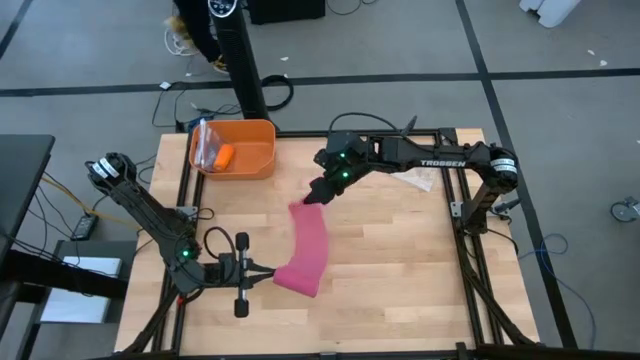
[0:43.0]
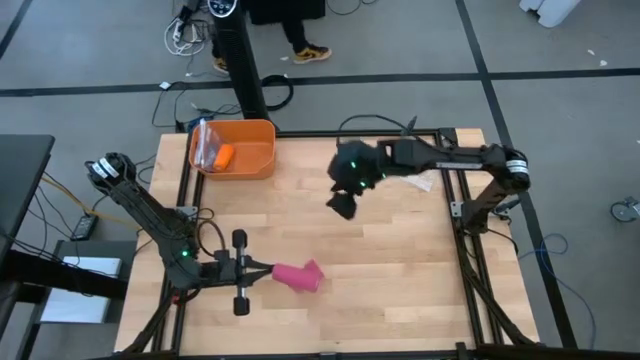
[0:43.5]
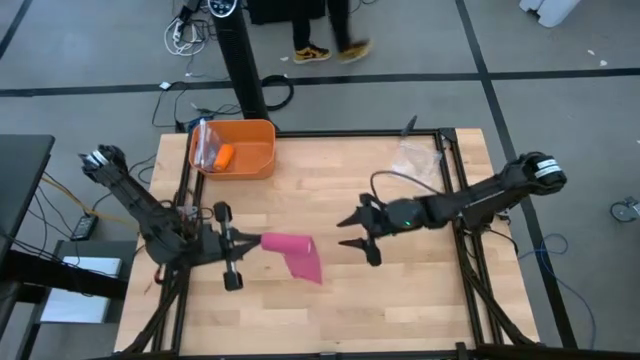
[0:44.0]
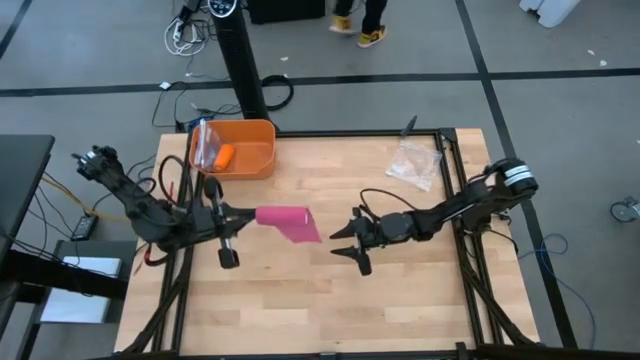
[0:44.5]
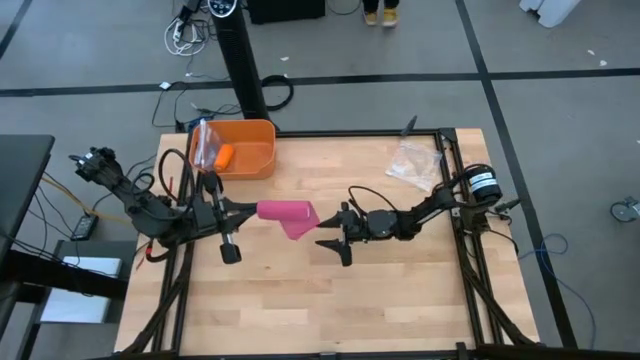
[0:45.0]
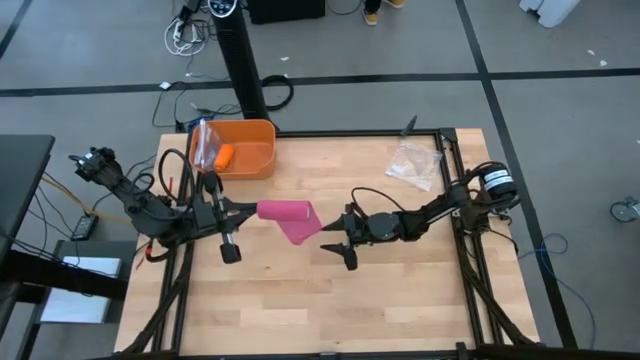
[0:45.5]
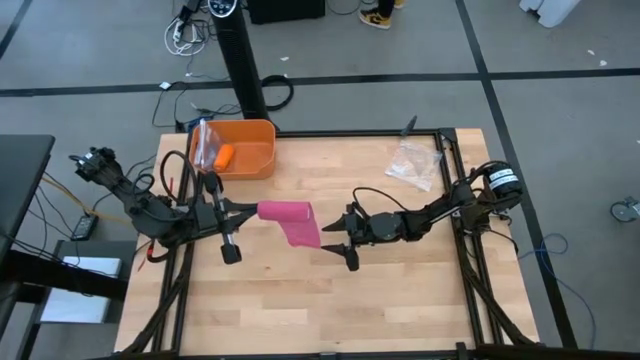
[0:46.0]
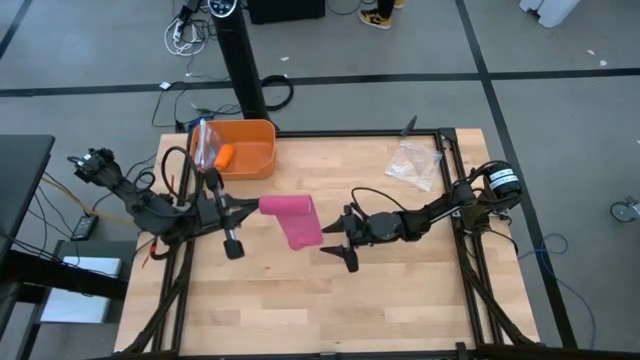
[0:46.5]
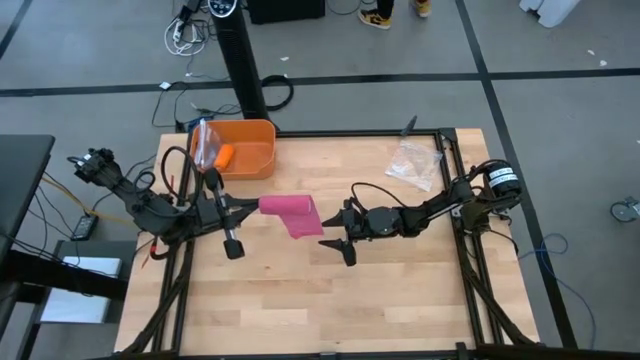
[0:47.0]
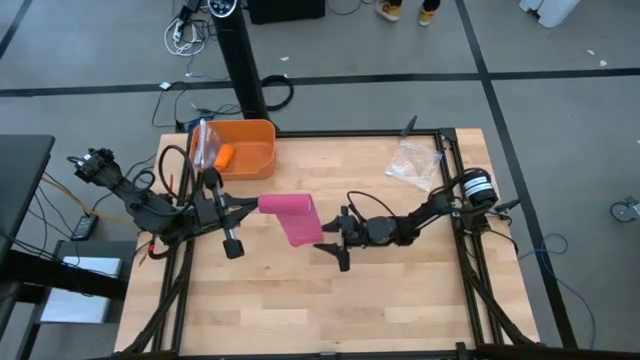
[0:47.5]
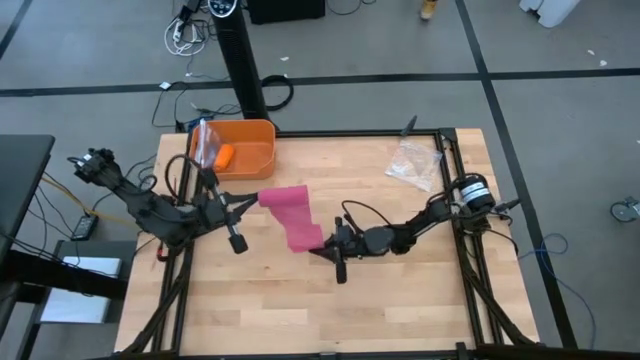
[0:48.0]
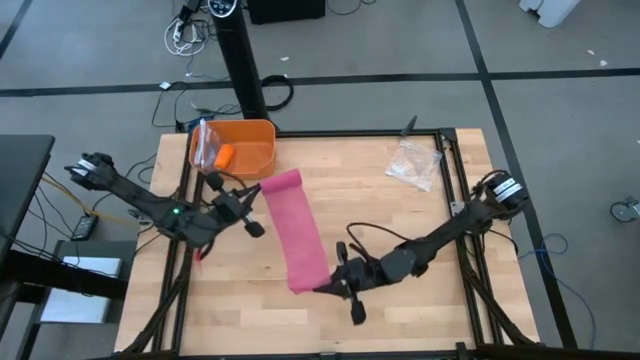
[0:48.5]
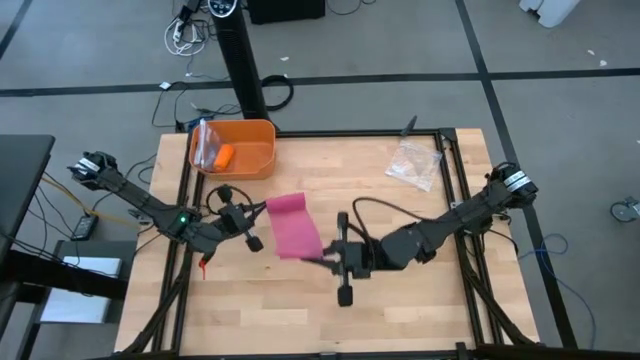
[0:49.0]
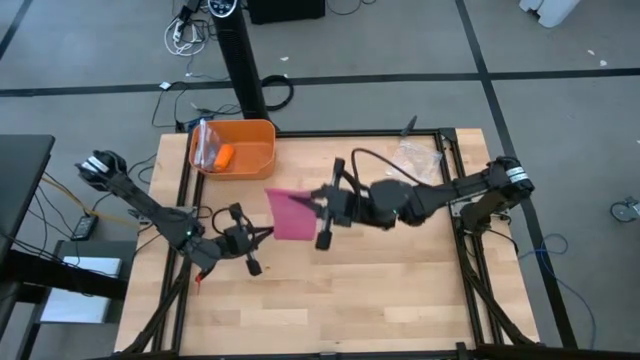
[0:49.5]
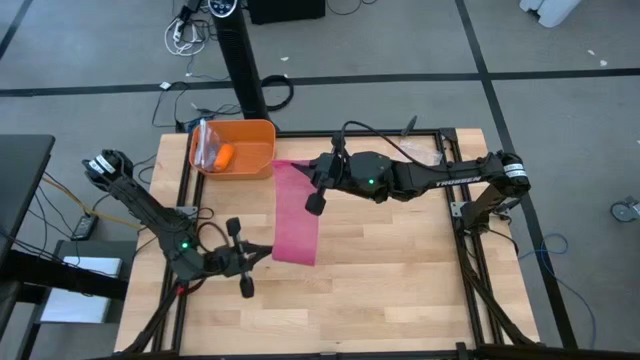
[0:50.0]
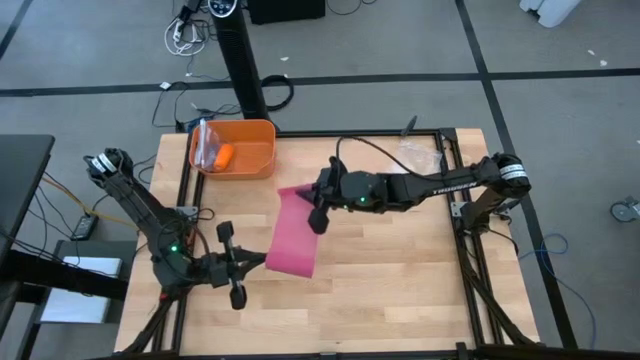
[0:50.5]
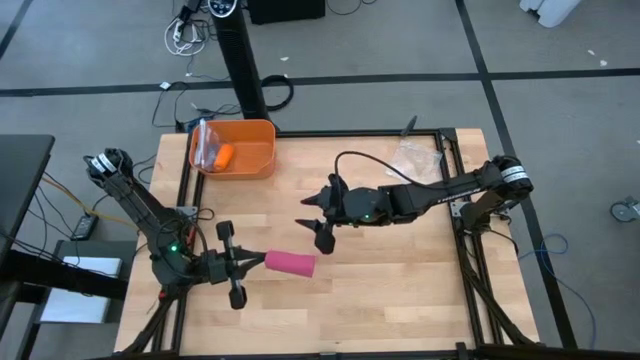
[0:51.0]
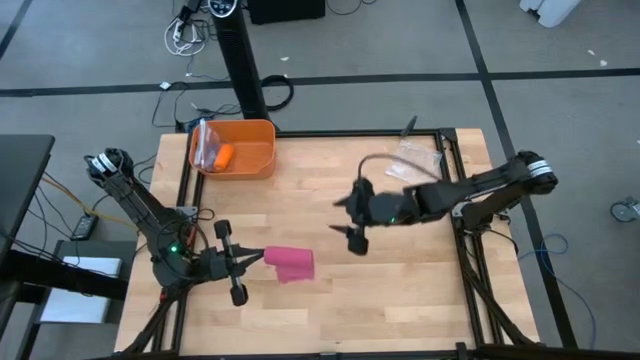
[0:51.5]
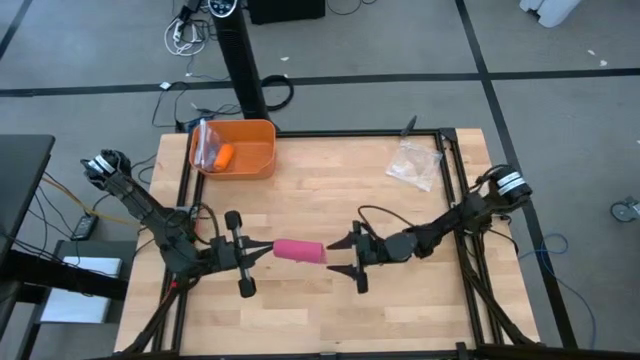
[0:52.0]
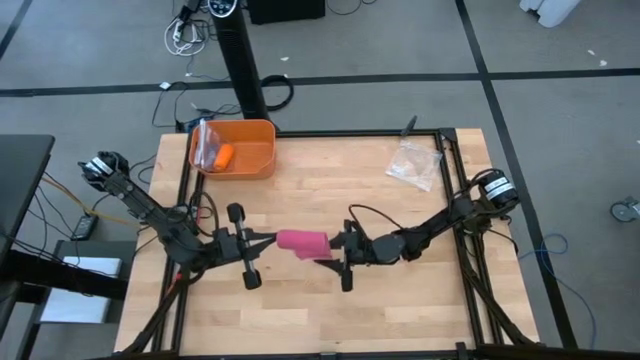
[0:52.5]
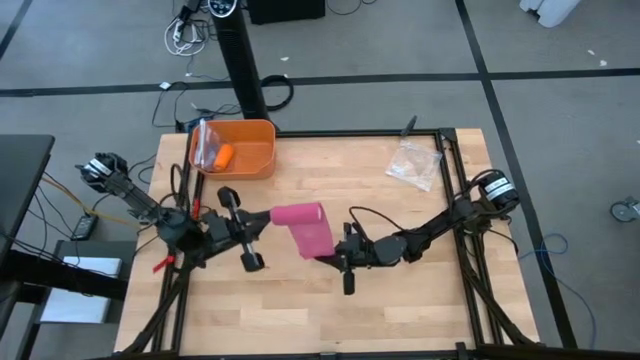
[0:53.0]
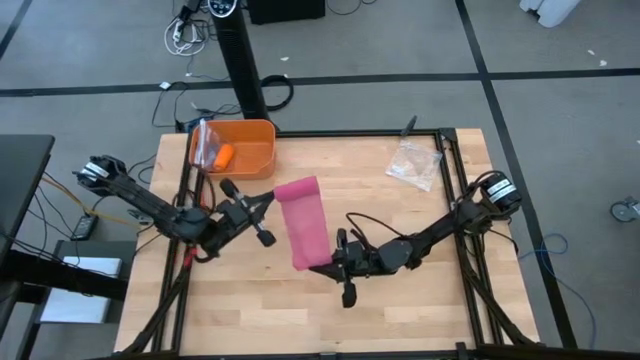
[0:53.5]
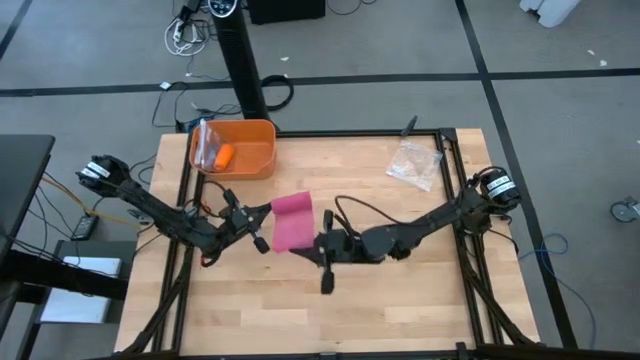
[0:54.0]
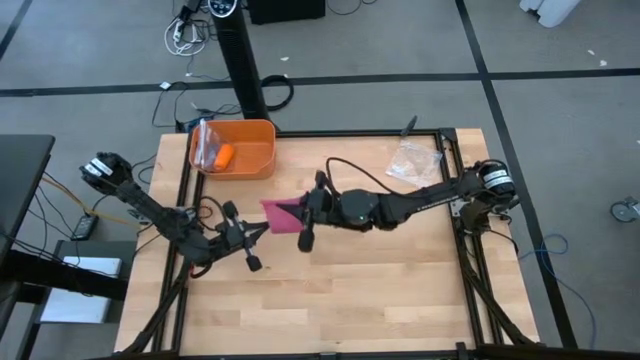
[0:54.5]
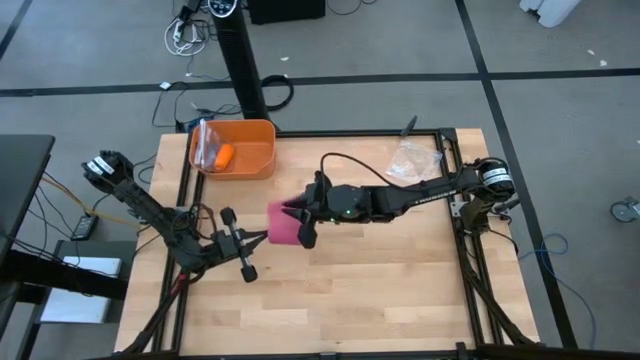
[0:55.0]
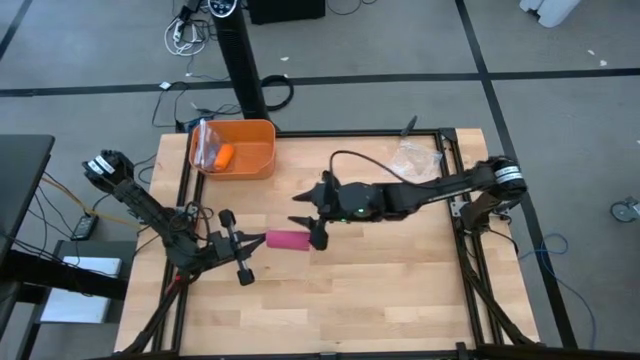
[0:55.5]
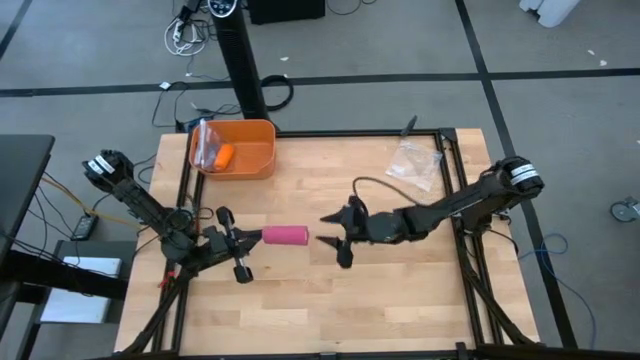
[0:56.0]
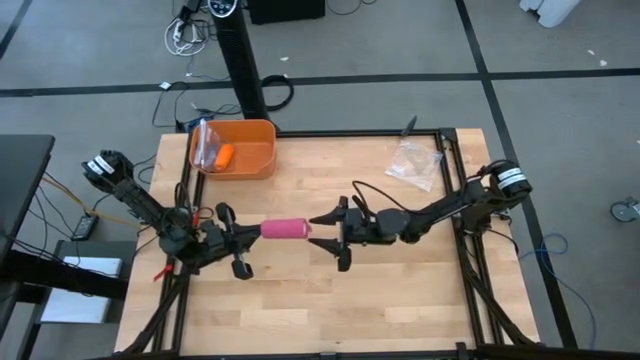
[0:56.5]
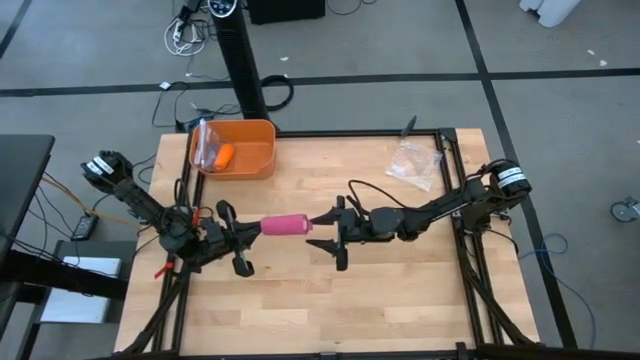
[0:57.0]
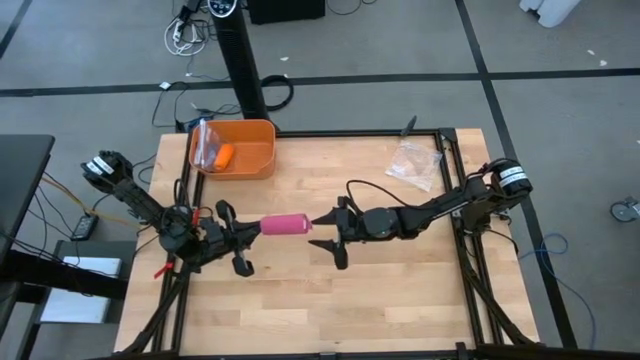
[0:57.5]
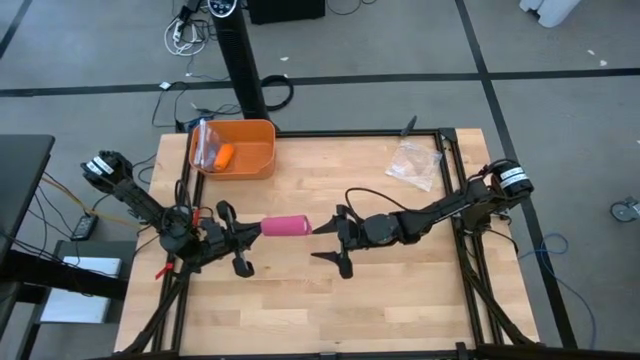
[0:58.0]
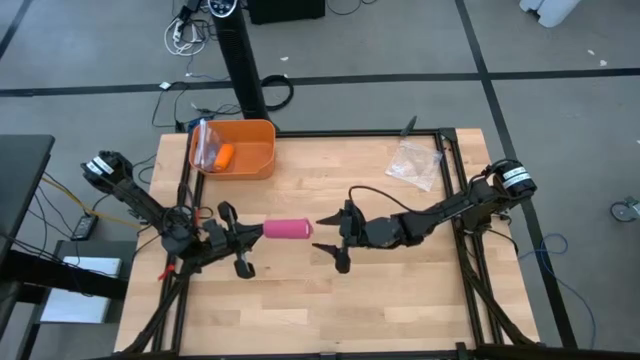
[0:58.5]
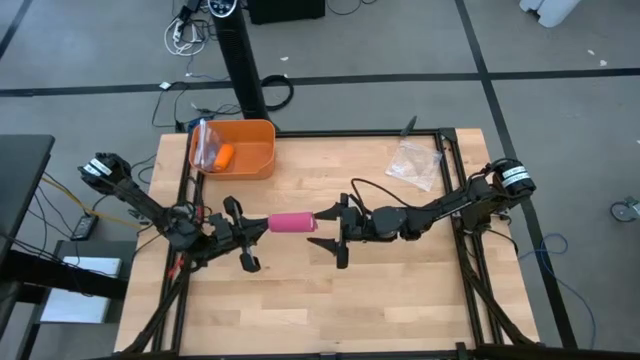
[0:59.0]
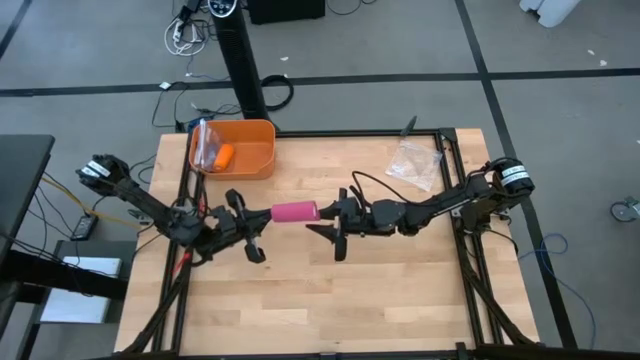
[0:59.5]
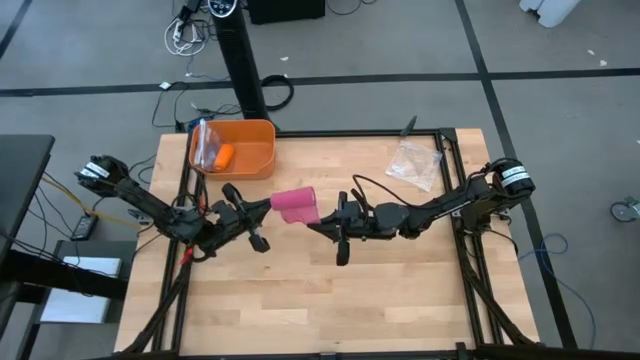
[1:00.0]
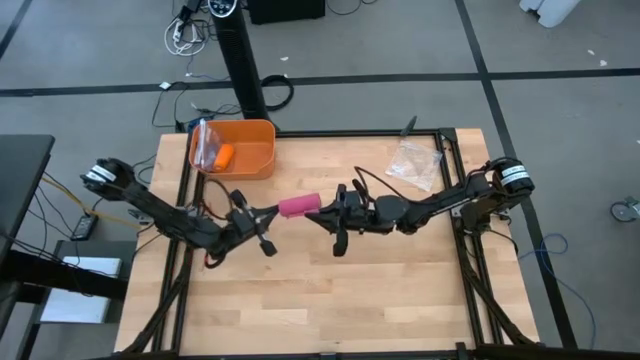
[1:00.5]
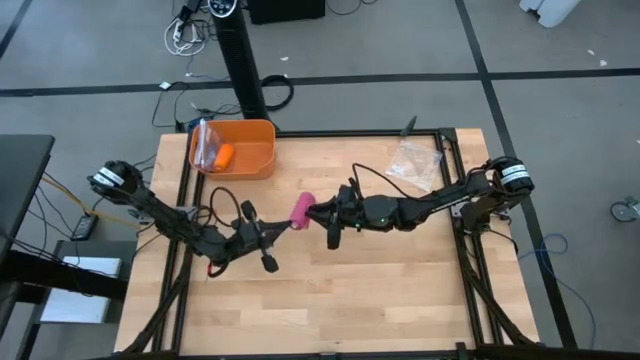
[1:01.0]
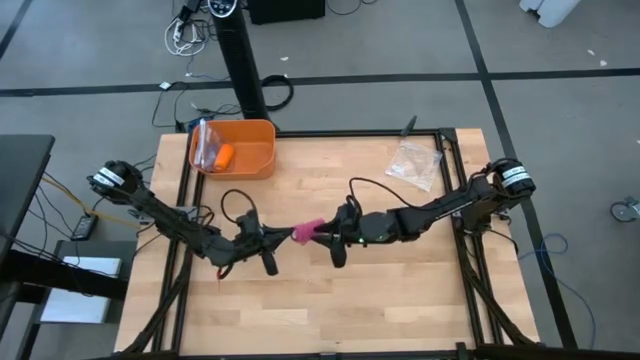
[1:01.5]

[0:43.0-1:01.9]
Task: Roll bandage
Roll the pink bandage
